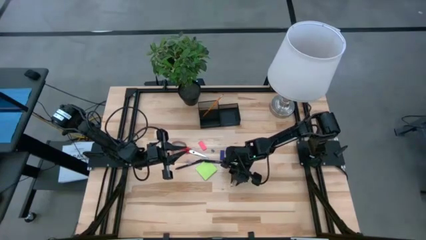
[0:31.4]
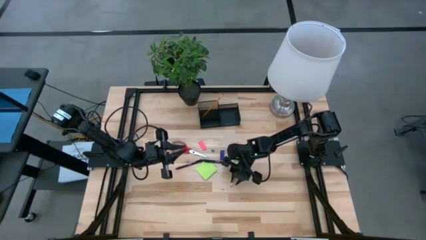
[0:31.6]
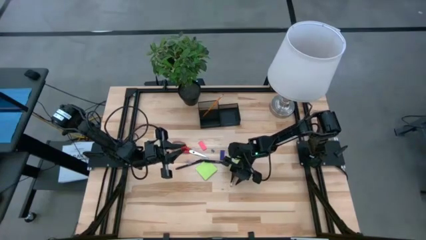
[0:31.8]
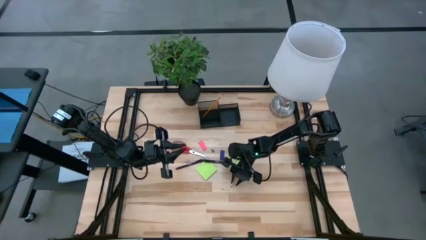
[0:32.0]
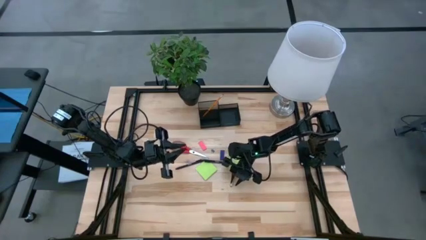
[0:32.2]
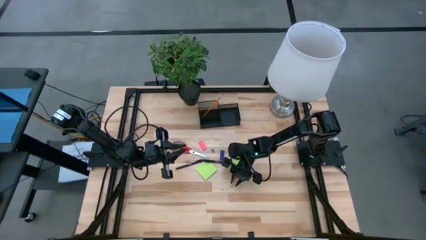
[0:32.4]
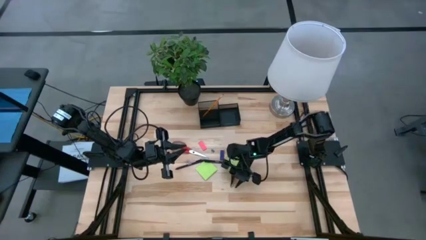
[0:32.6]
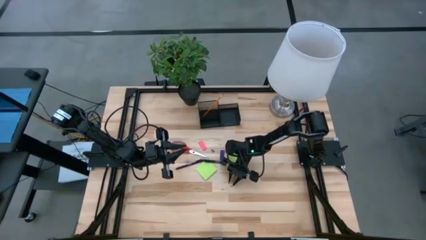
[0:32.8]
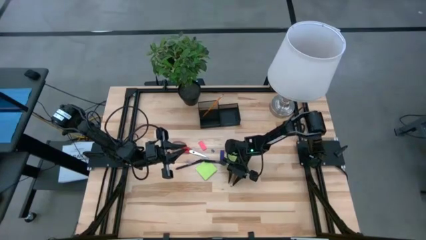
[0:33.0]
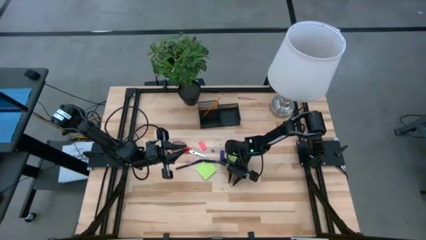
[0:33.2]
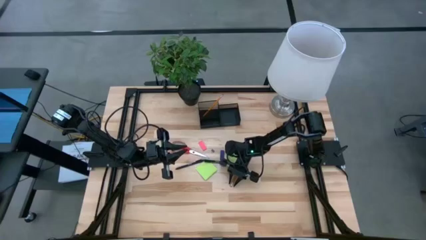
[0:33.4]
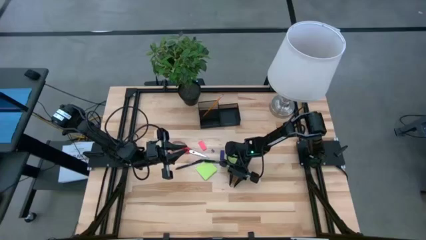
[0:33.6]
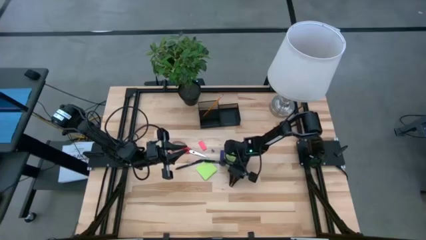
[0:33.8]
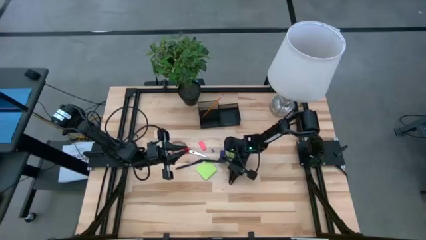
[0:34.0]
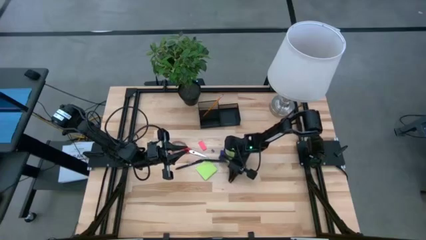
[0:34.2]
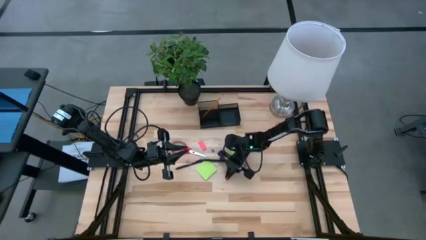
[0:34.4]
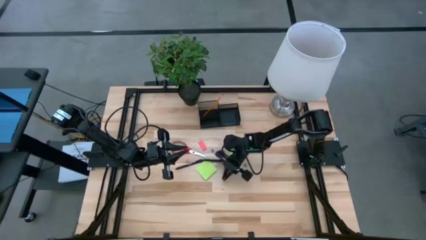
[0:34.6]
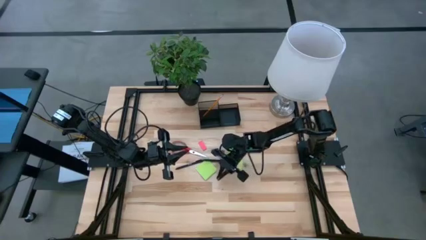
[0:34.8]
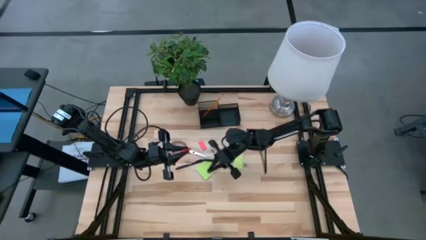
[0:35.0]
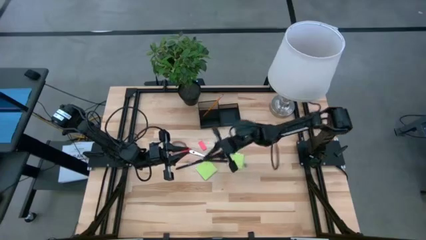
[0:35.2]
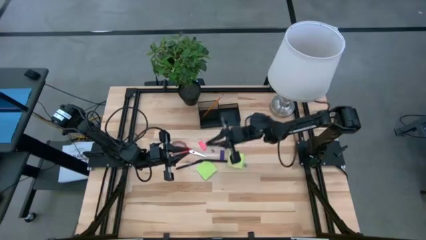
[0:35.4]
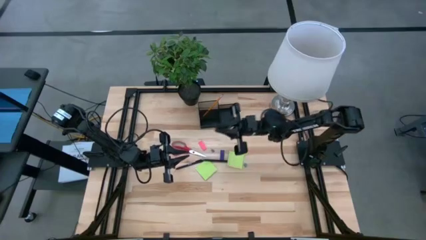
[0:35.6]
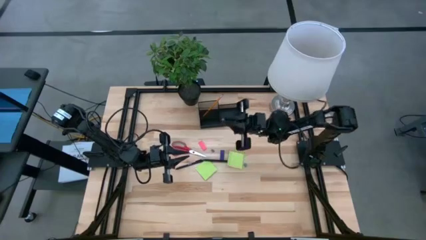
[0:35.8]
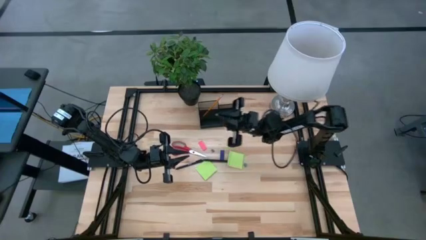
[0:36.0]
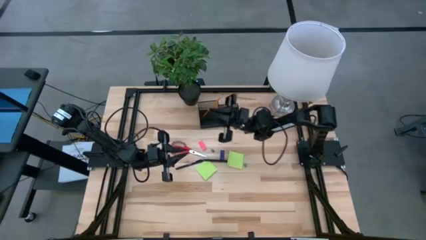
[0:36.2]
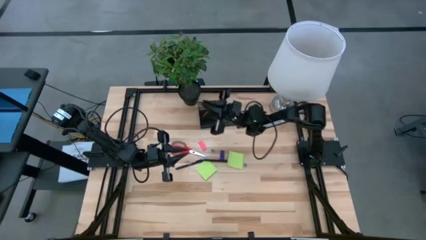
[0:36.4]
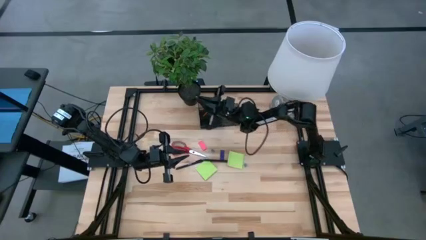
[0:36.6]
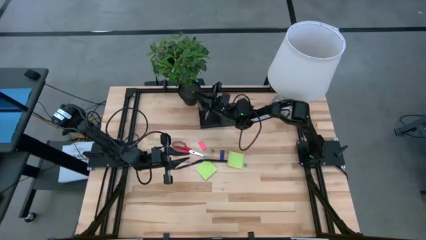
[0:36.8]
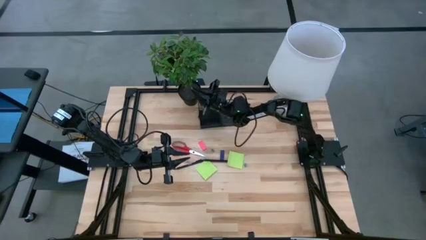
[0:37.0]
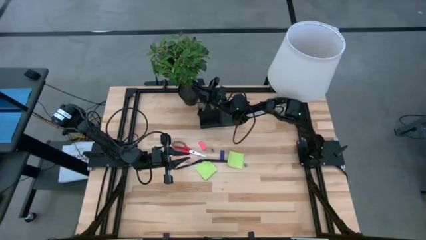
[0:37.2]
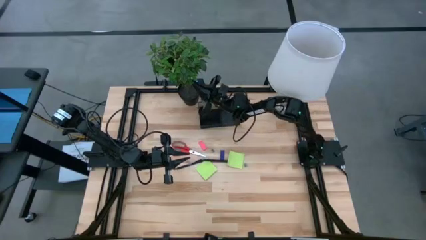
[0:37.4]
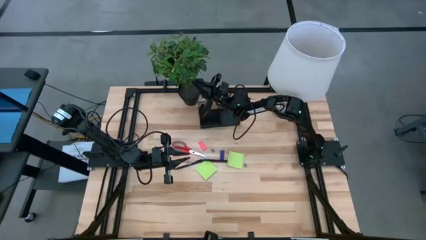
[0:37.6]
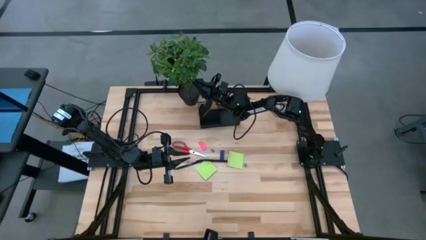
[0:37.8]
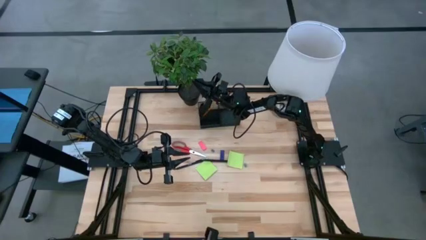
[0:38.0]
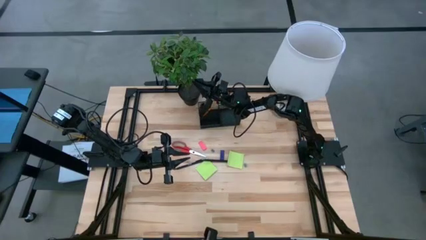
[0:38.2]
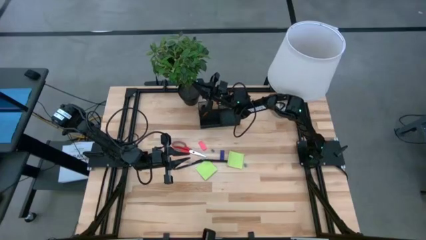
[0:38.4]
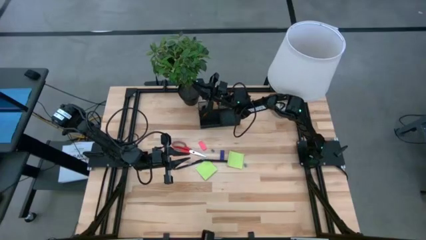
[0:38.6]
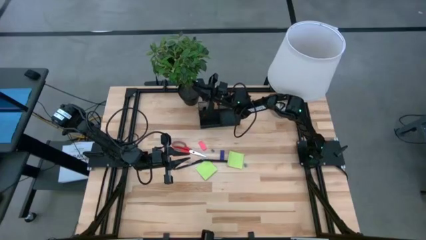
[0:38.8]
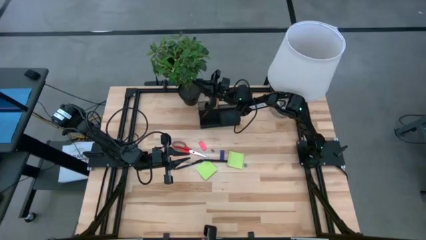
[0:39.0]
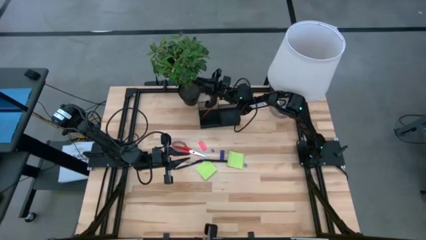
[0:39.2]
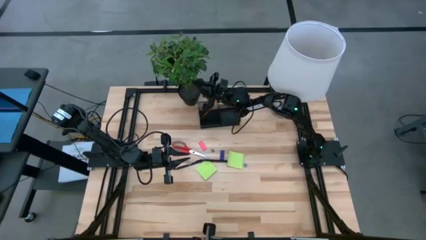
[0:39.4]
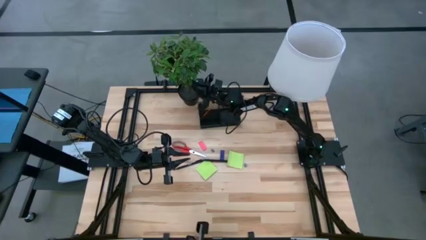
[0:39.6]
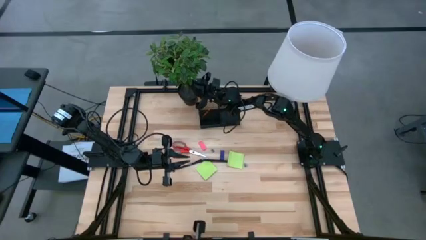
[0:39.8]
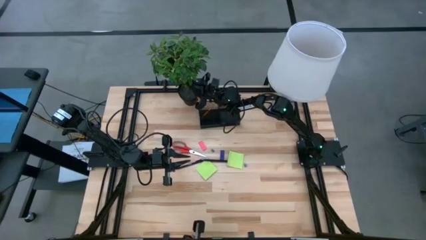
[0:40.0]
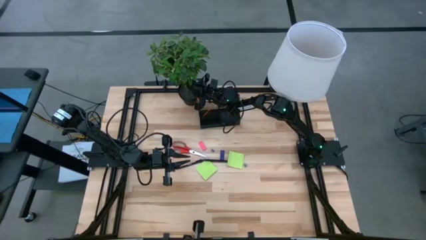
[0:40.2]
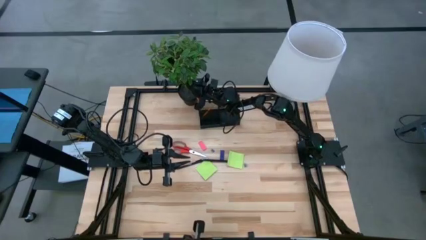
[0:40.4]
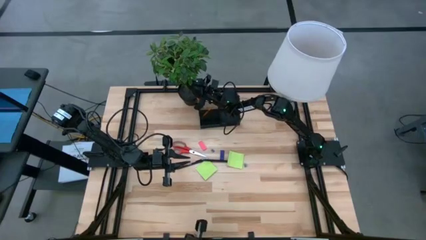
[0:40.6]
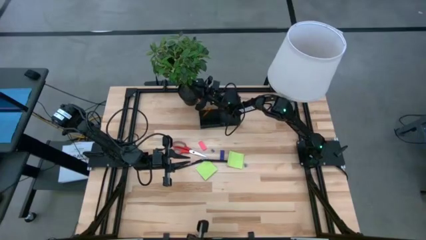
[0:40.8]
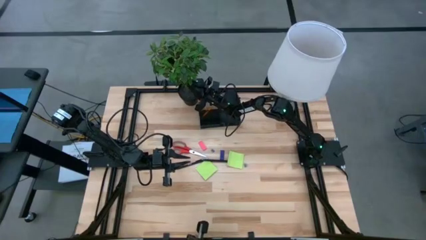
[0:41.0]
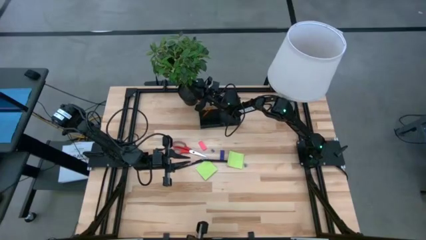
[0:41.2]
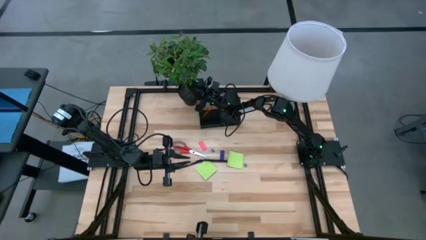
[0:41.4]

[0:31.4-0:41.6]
Task: Pick and place office supplies into organizer
Put the orange pencil into the desk organizer
